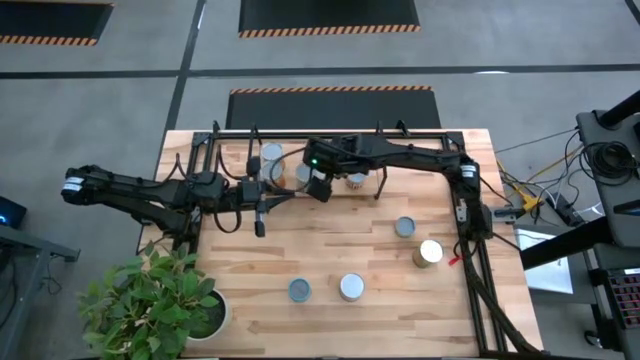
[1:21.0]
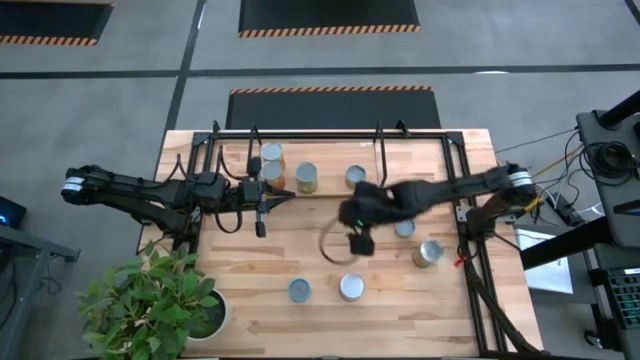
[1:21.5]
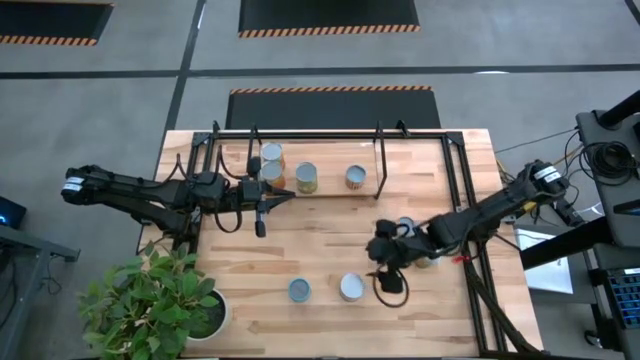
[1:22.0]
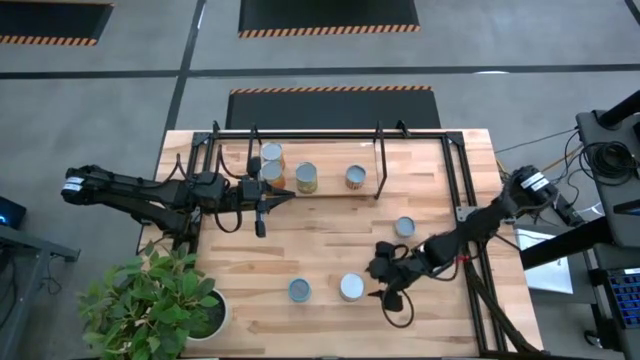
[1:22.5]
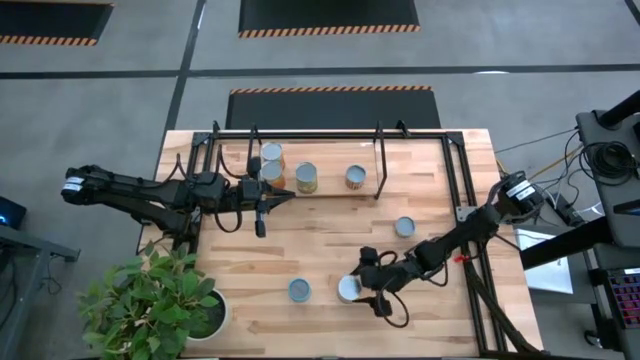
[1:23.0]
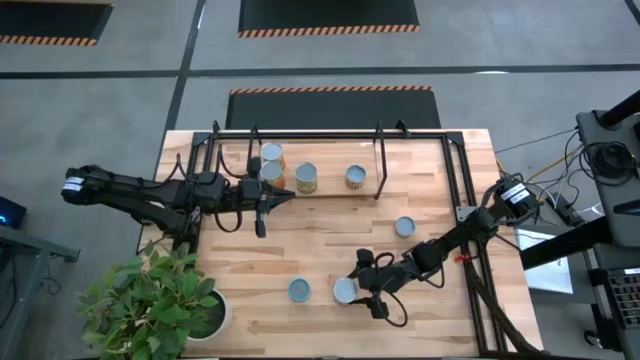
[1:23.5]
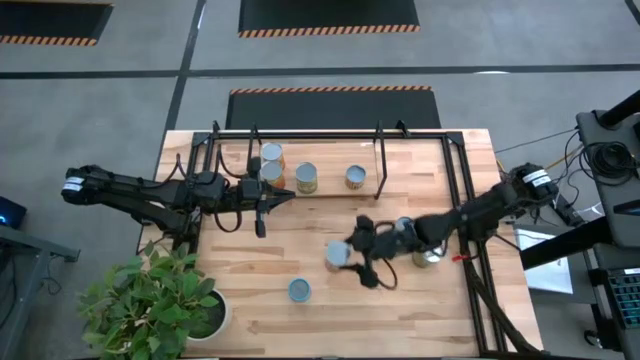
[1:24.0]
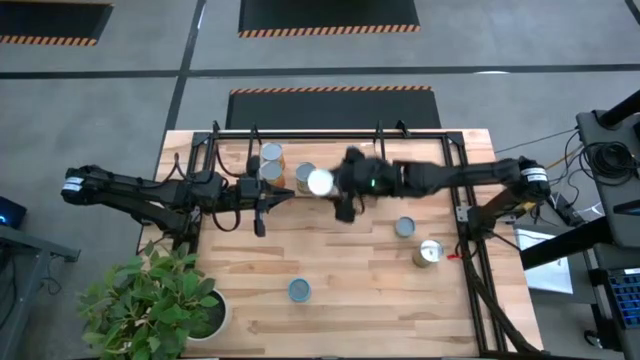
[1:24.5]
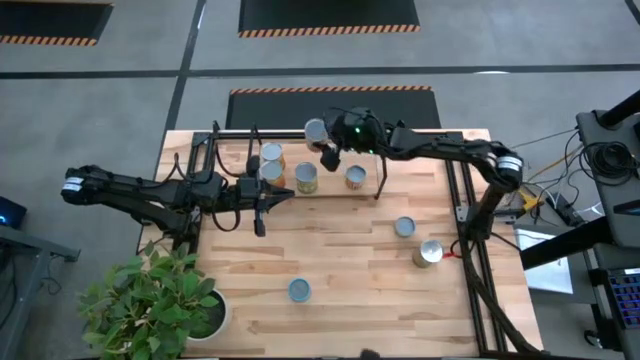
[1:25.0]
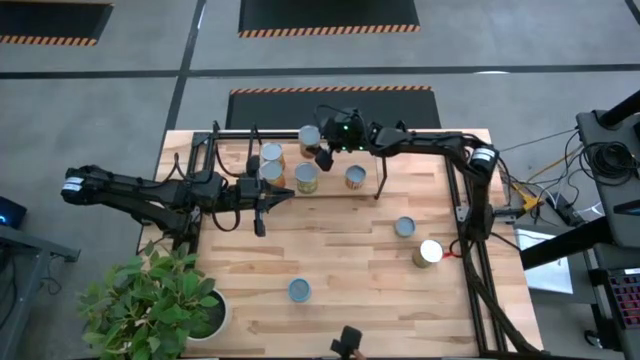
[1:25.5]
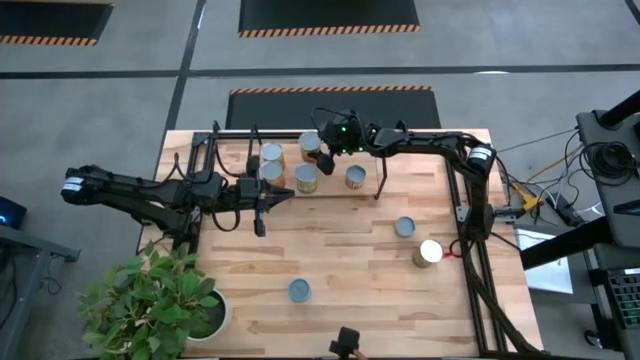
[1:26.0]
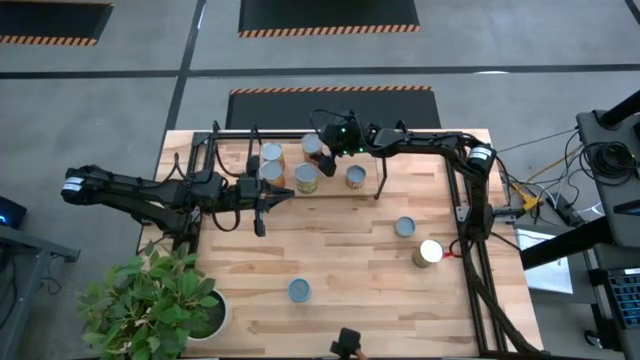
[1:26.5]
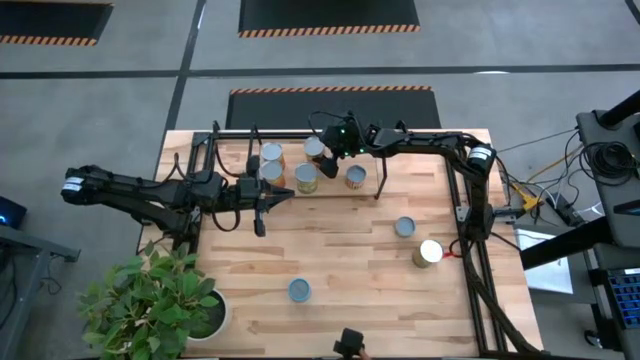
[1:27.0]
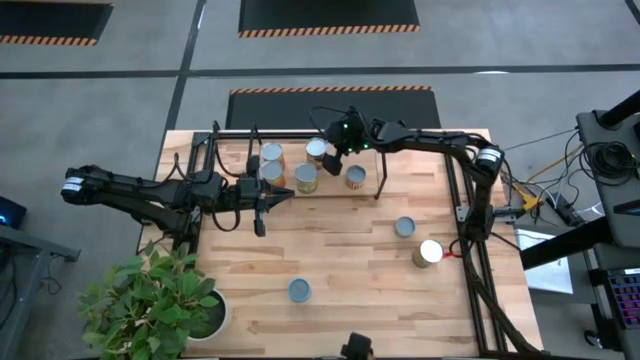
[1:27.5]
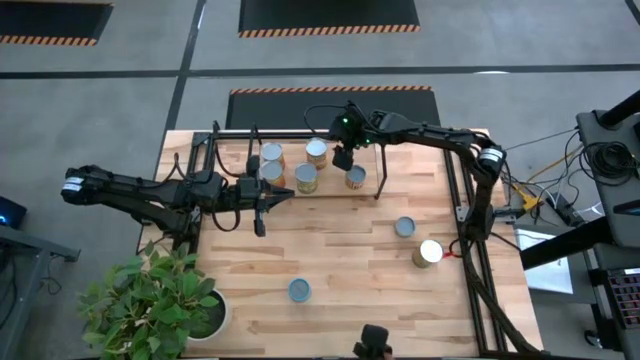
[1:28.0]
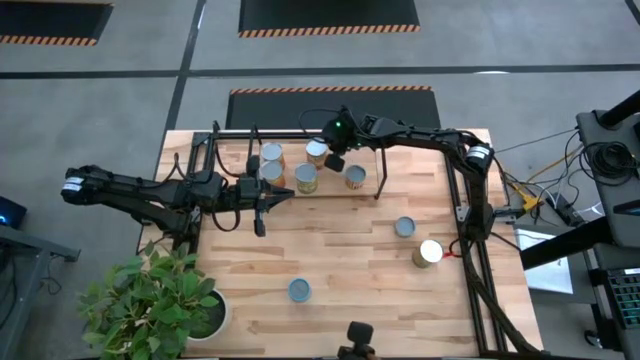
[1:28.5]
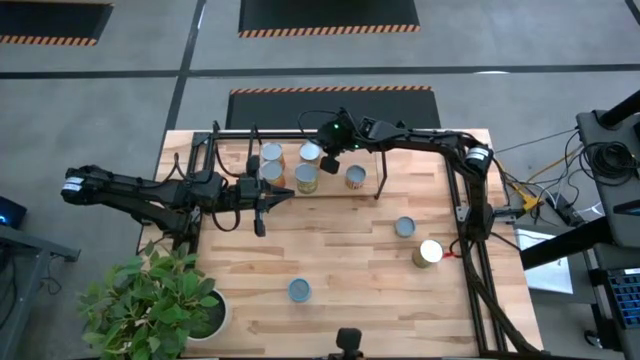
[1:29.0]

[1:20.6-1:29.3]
Task: Pick and place cans onto a shelf
Put the big orange canned corn on the shelf aligned with the other big green canned pear

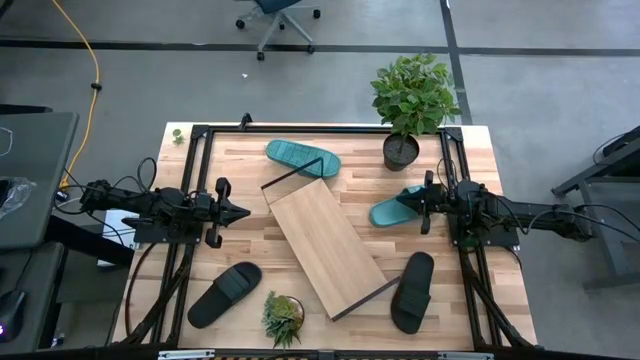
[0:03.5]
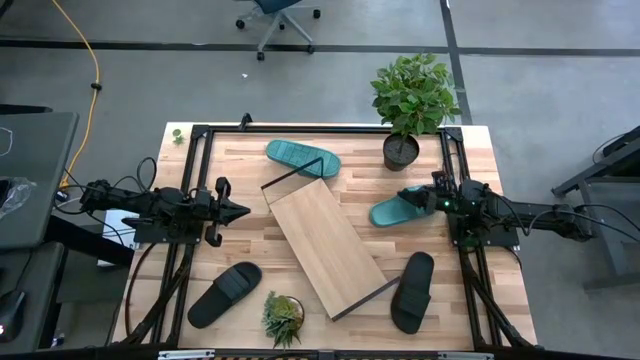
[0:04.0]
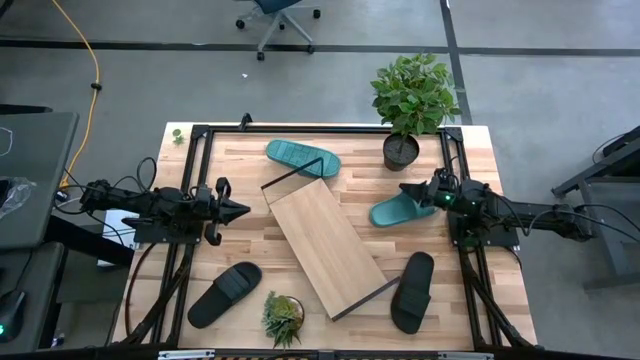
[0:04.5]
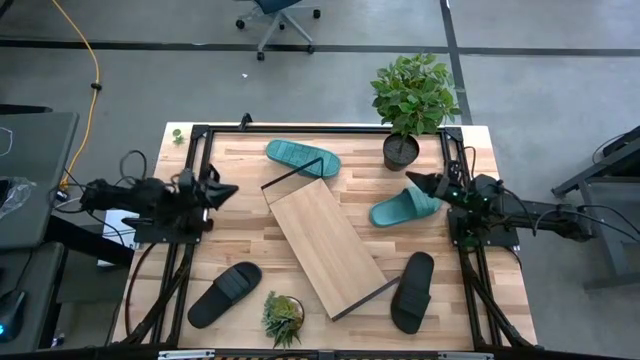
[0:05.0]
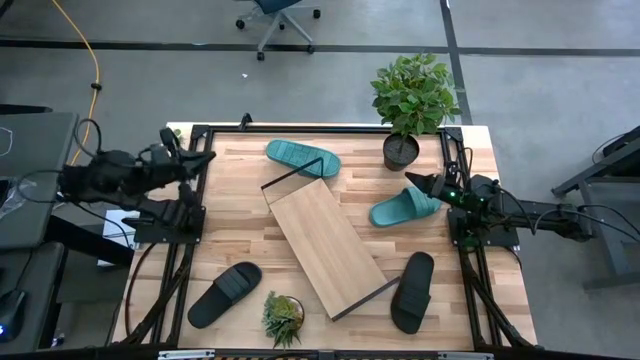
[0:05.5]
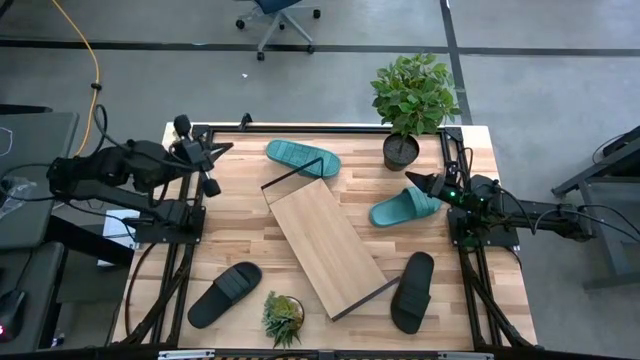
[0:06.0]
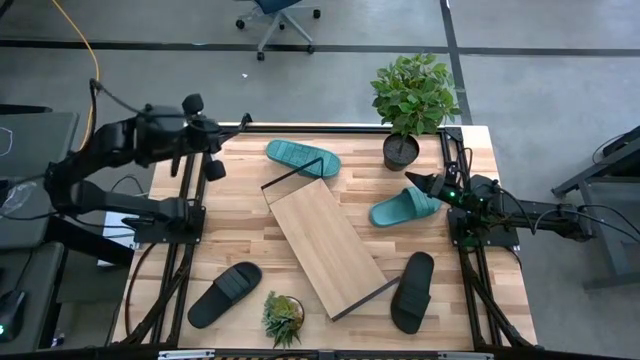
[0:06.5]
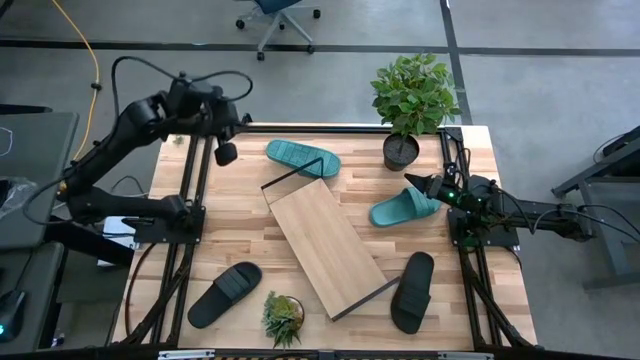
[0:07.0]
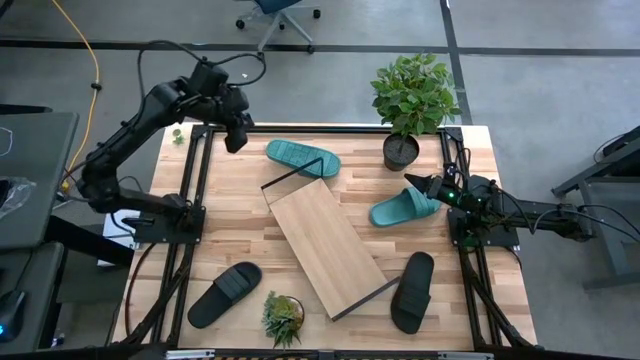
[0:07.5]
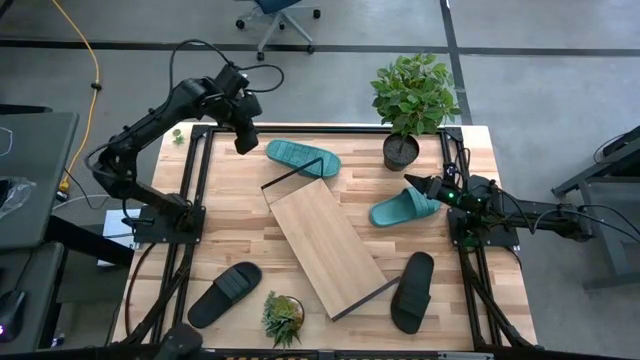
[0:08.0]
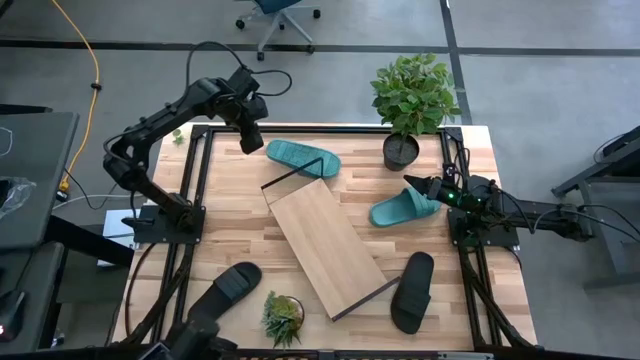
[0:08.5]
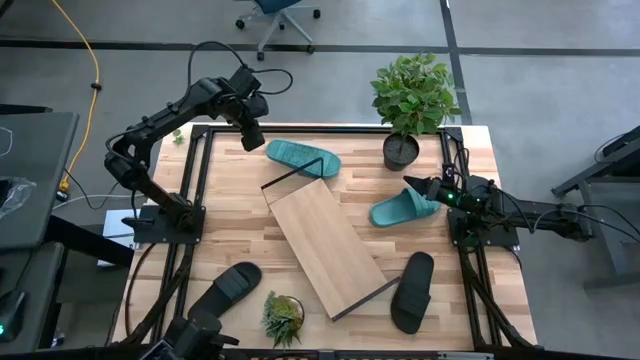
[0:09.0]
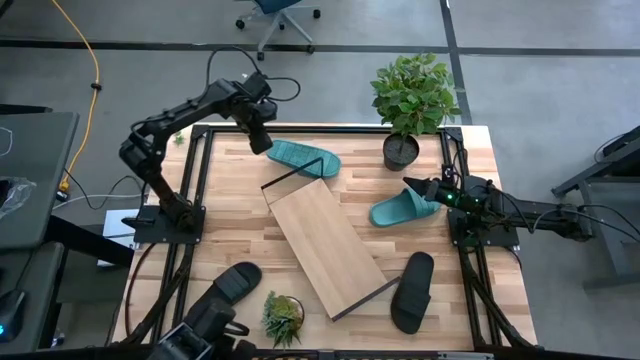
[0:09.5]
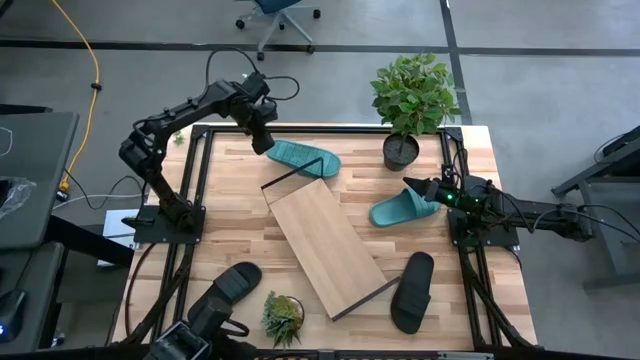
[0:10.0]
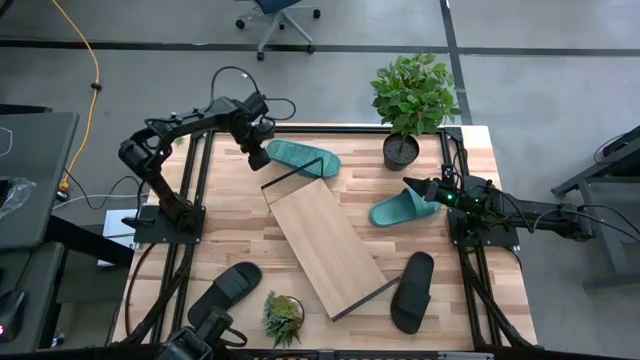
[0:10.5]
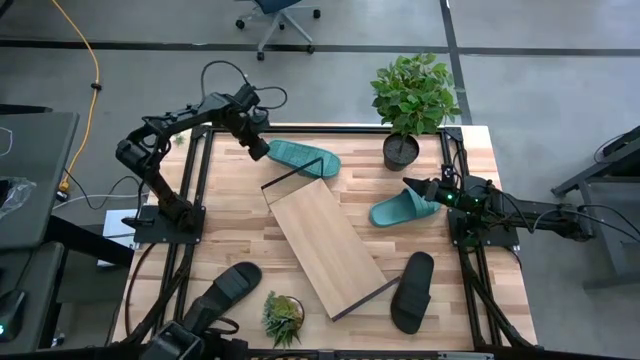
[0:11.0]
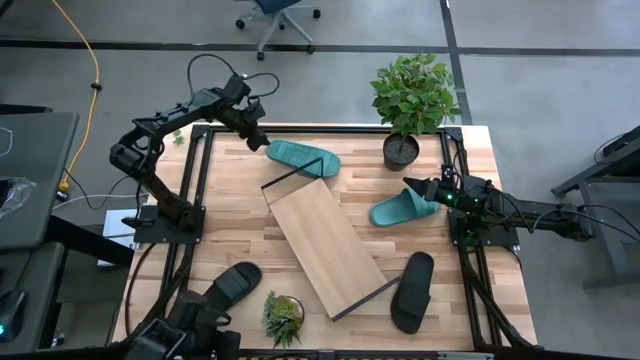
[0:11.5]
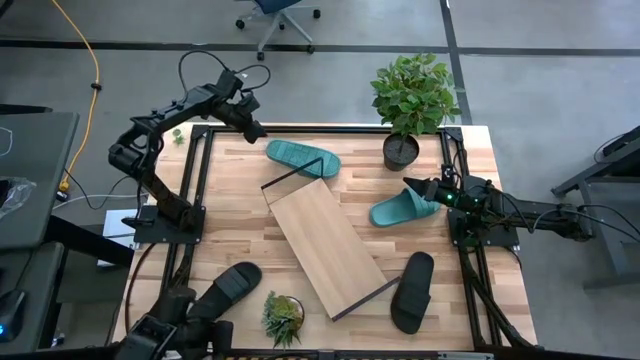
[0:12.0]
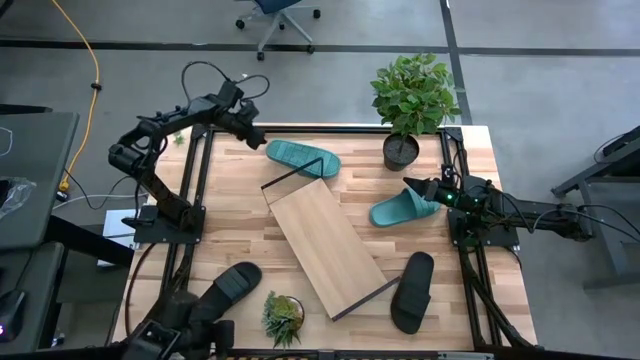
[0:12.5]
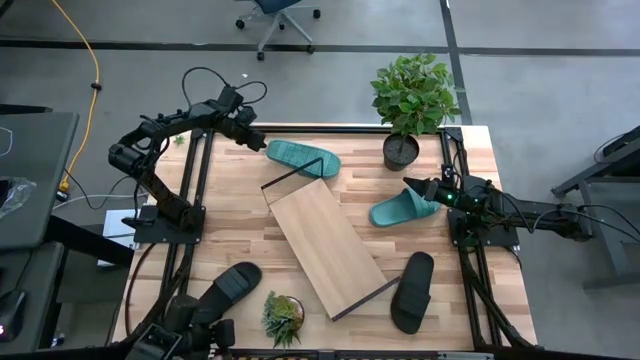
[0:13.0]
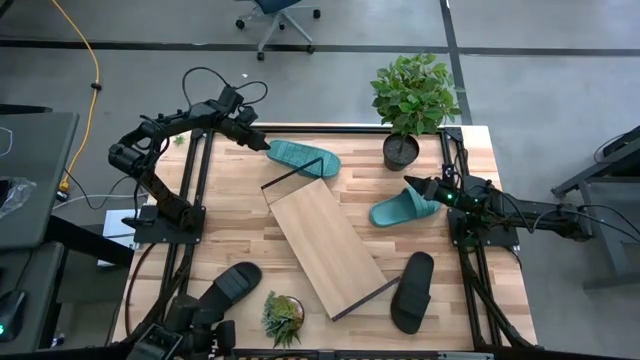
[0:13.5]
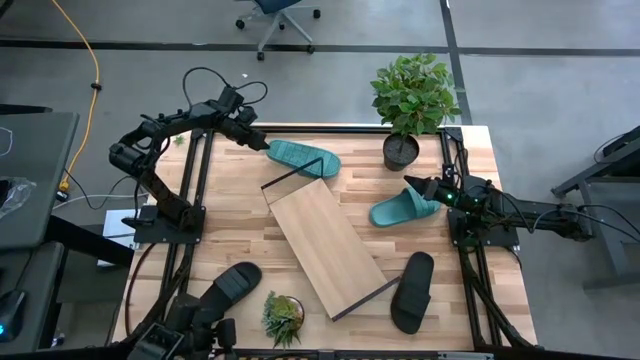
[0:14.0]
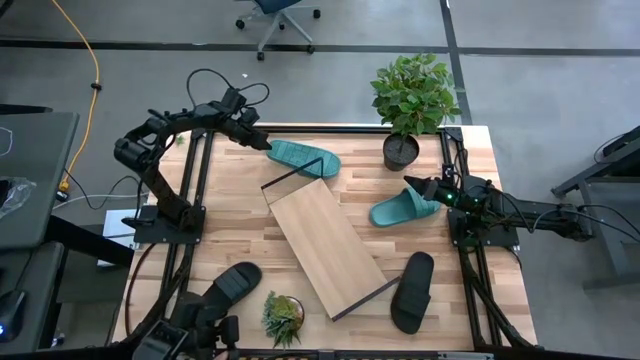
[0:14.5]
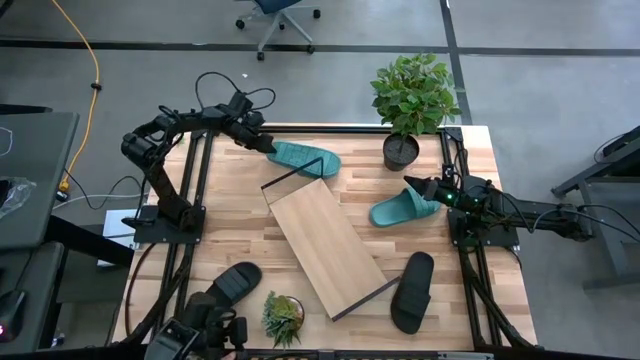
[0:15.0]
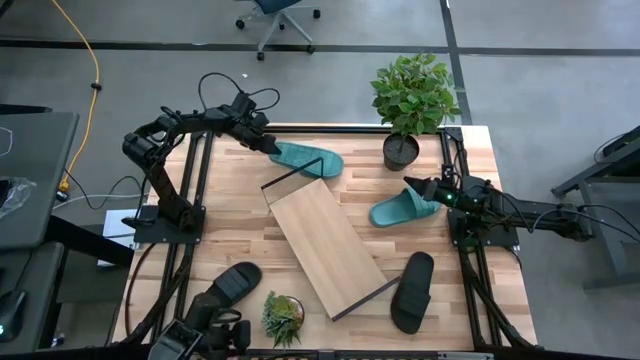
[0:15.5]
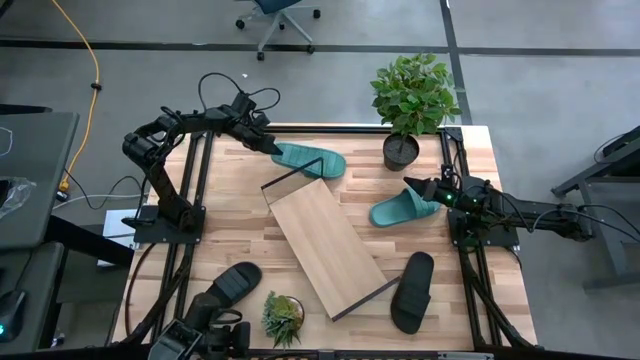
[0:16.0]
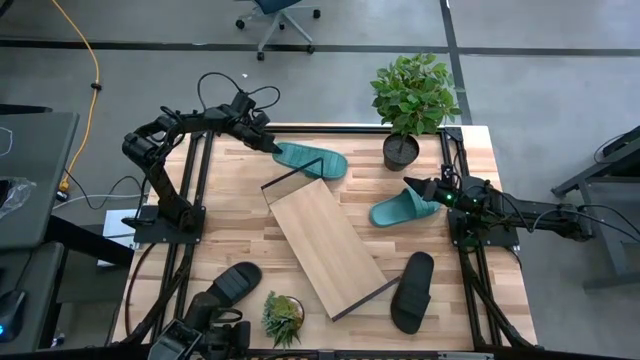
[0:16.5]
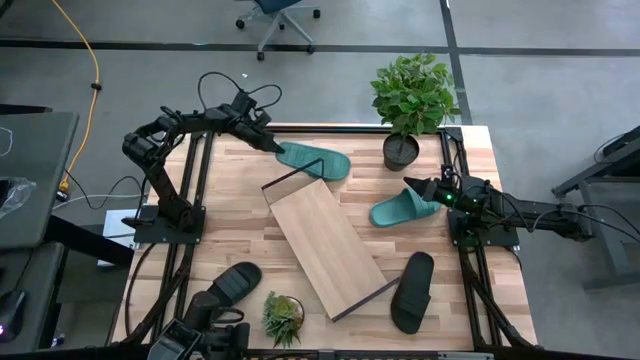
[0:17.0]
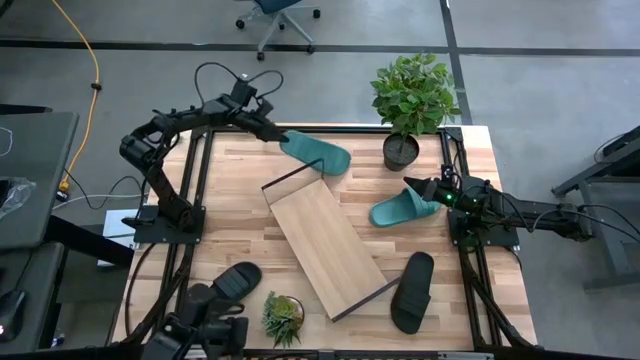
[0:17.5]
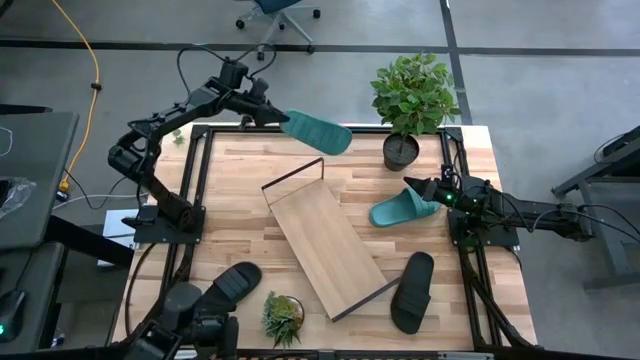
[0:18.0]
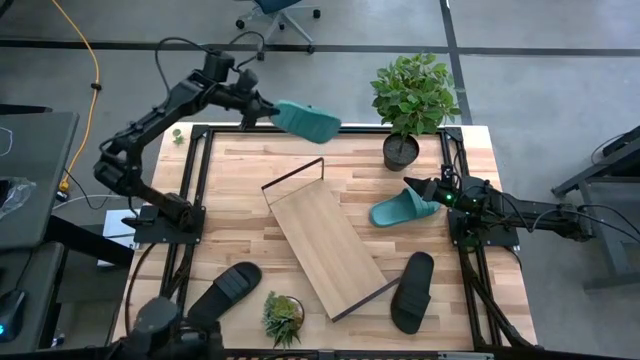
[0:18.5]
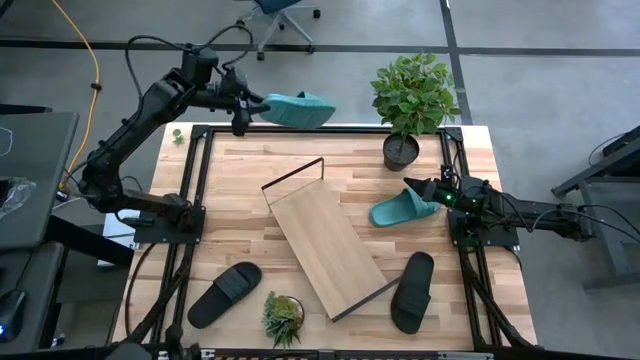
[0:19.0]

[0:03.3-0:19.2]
Task: Pick and place slides into the shelf
Put the top green slide on the shelf
